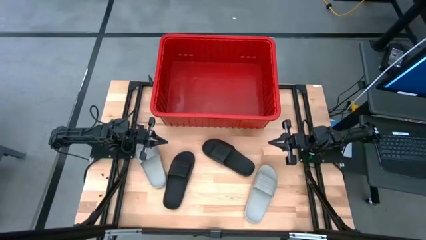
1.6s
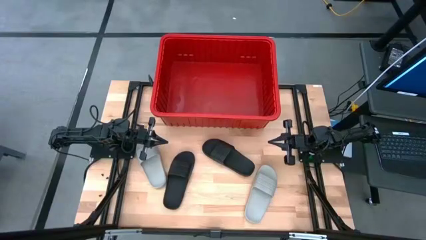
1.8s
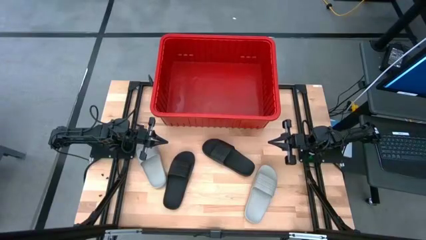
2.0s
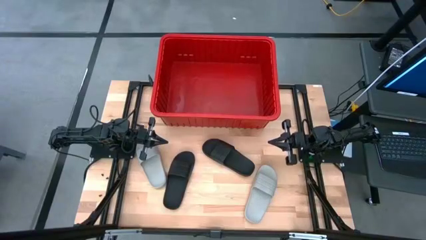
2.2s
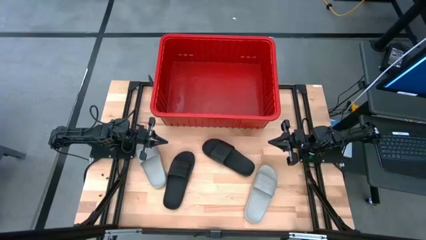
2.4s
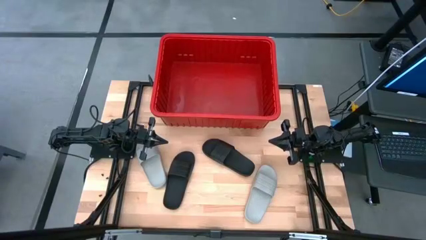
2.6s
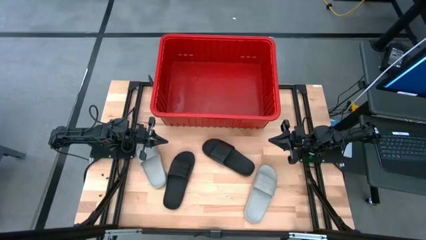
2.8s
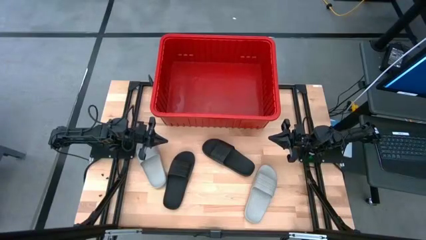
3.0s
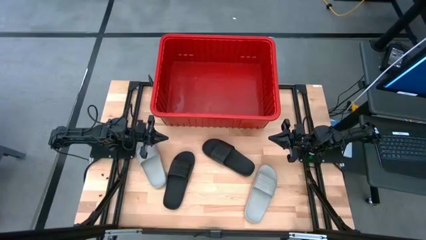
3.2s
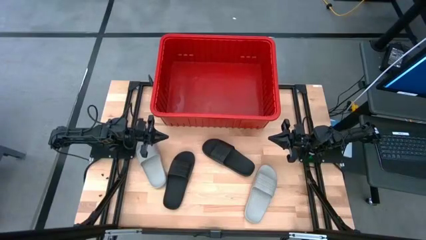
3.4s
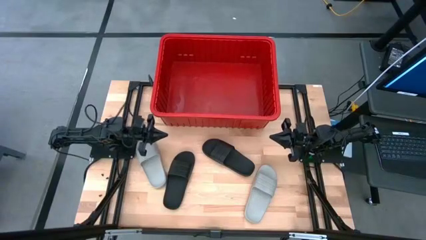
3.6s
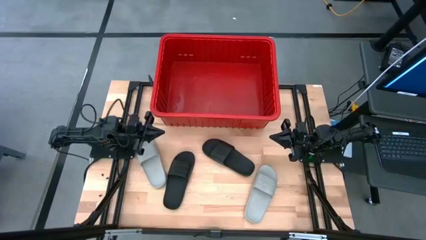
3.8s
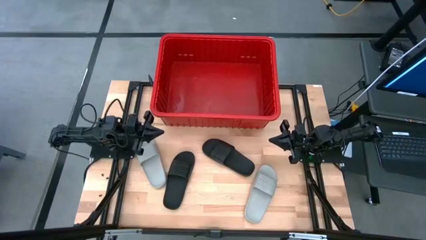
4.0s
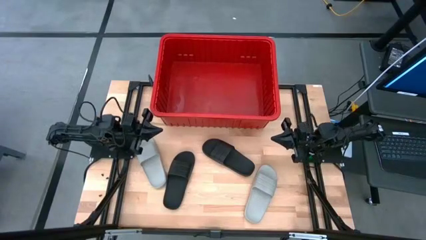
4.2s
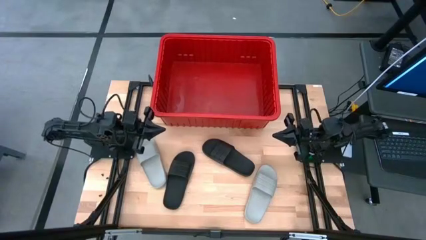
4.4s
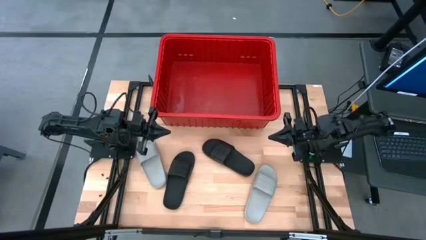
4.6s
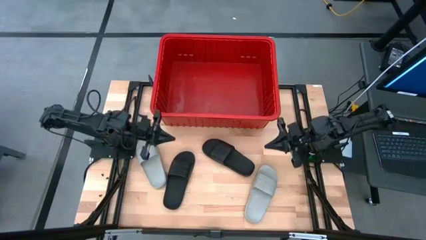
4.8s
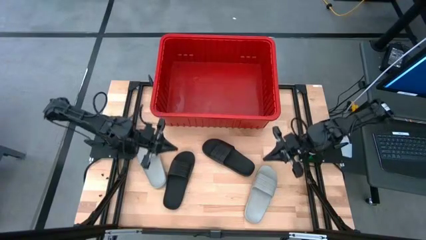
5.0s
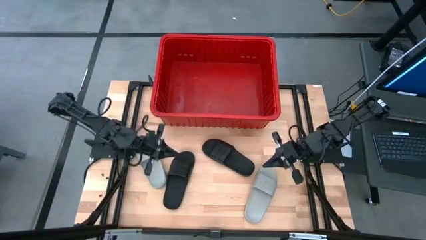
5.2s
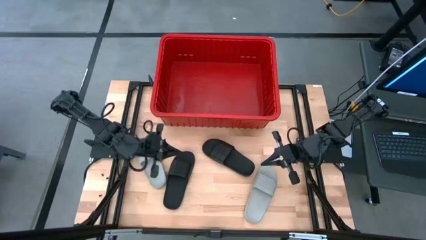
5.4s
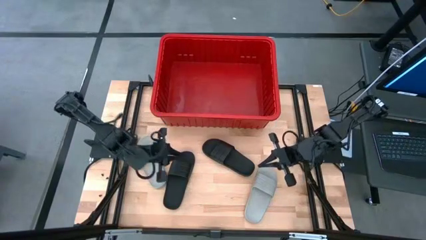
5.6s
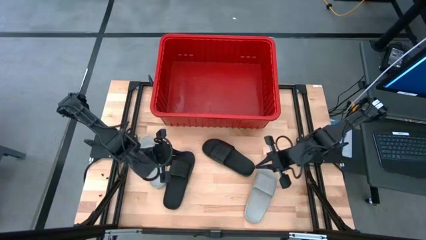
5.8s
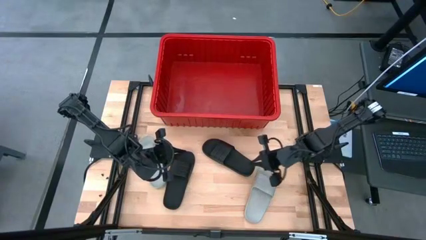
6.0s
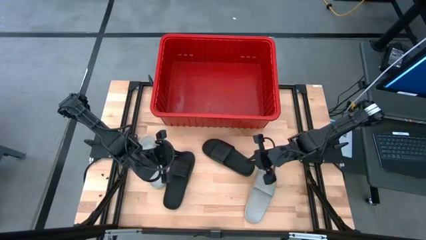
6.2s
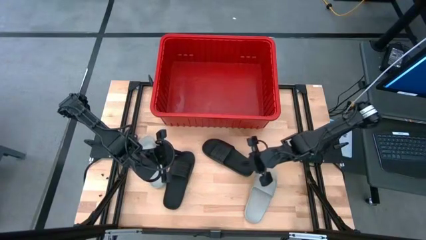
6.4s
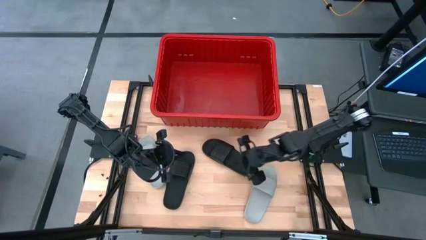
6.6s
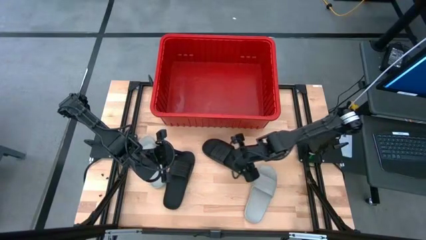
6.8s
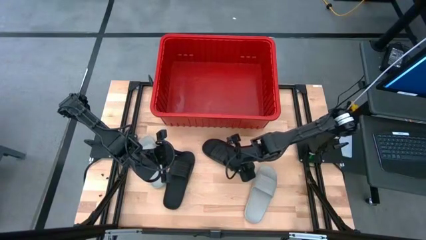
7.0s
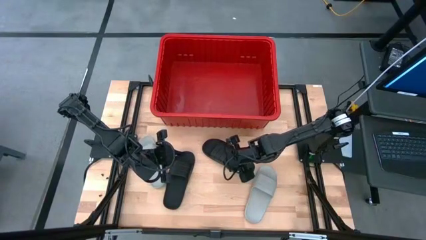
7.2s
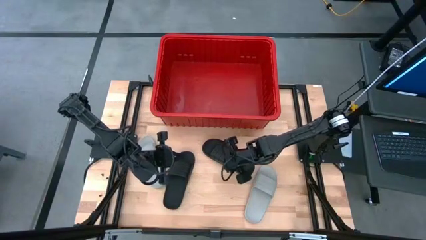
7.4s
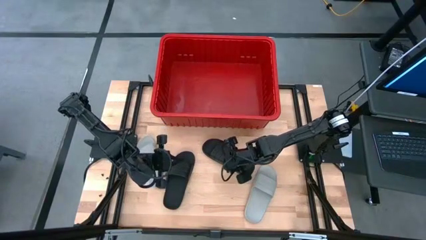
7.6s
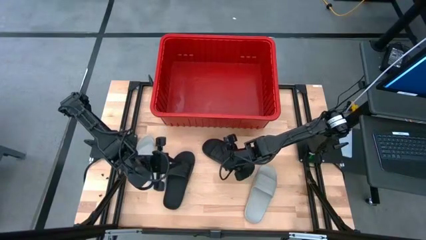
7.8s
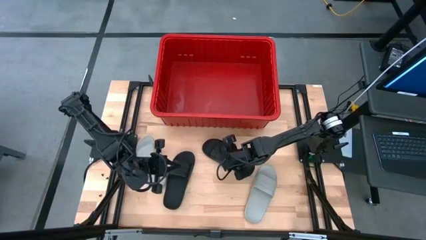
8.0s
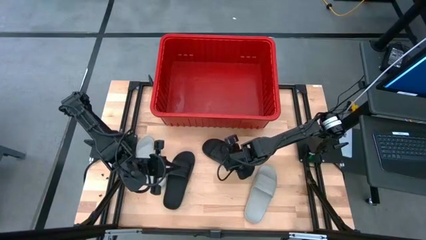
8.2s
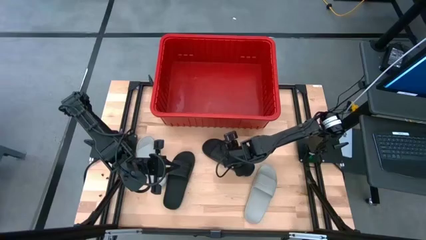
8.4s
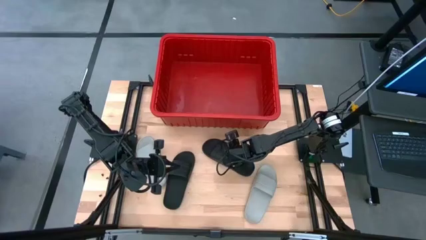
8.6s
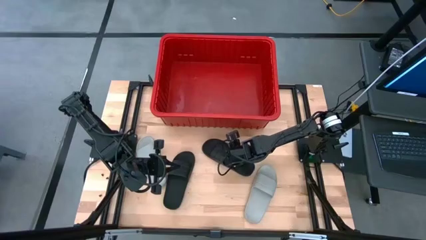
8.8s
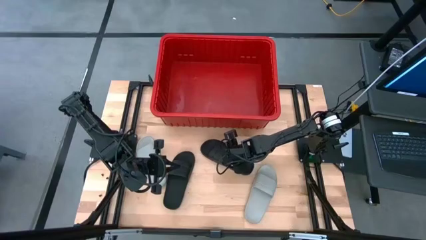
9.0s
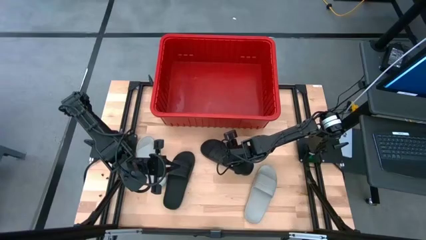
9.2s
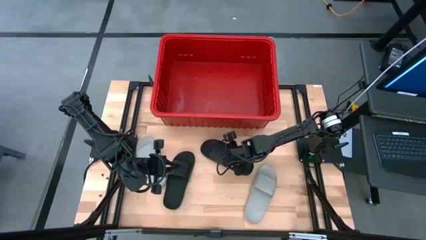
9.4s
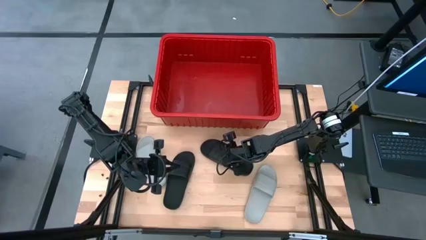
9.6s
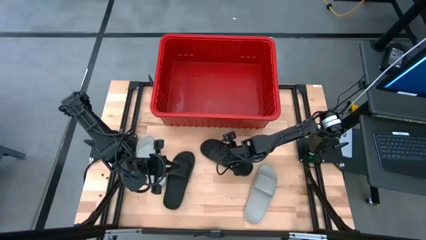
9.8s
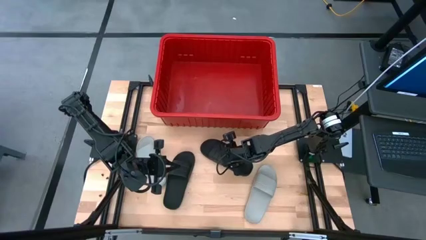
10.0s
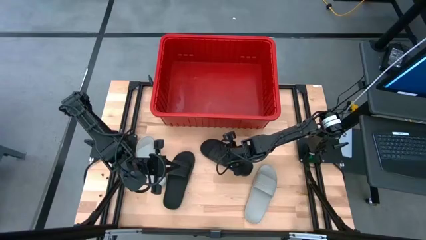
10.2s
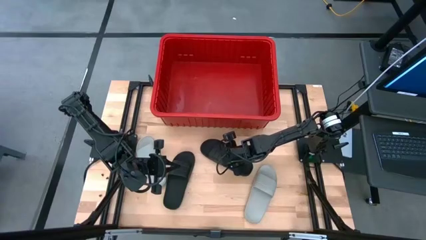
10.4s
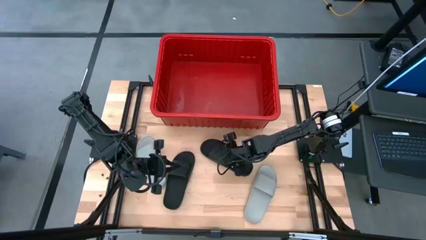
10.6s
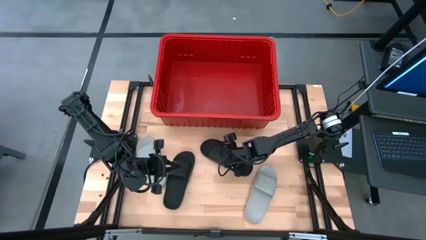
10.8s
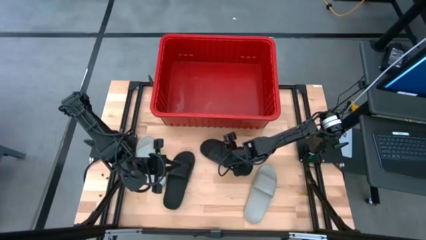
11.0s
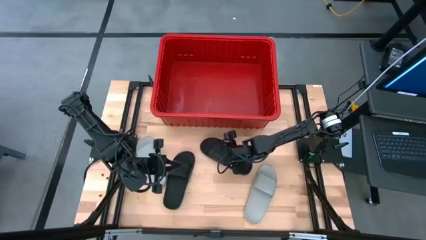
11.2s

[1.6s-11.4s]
Task: Pick and place slides into bin
Put the right black slide into the red bin

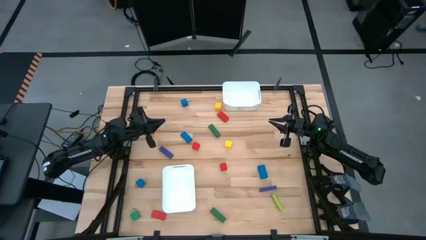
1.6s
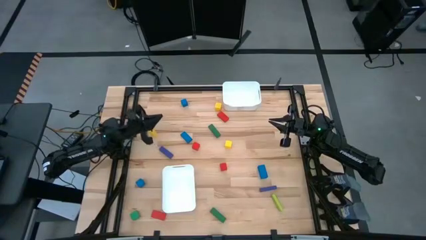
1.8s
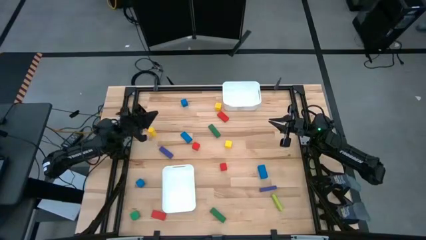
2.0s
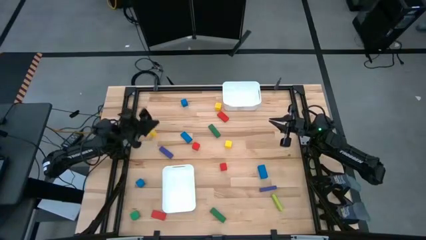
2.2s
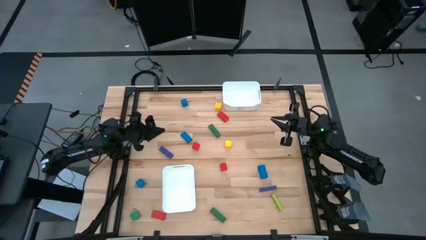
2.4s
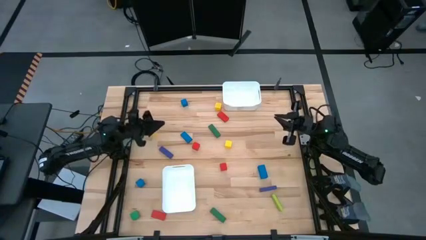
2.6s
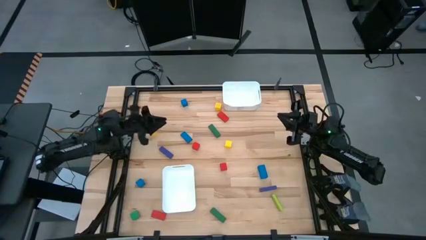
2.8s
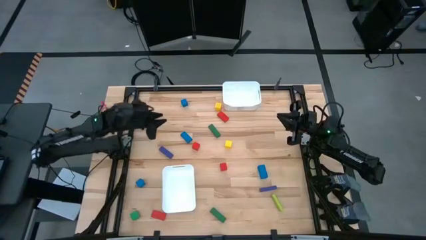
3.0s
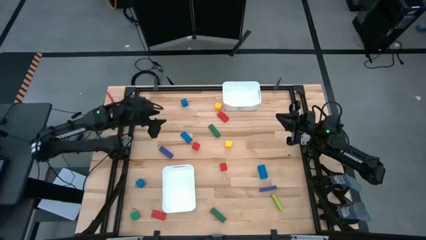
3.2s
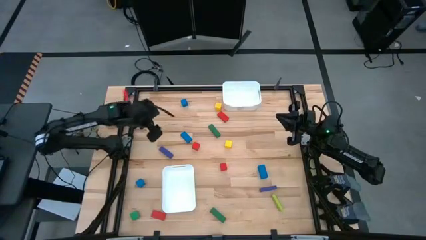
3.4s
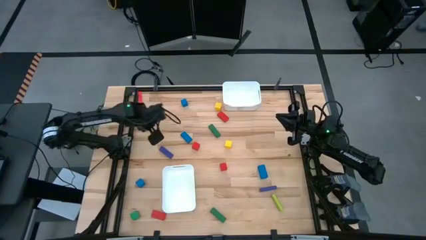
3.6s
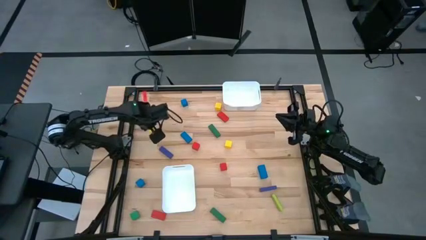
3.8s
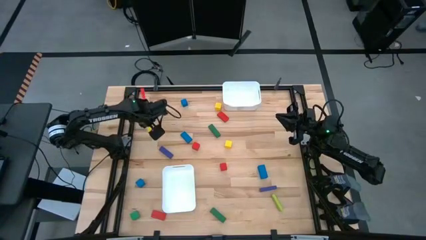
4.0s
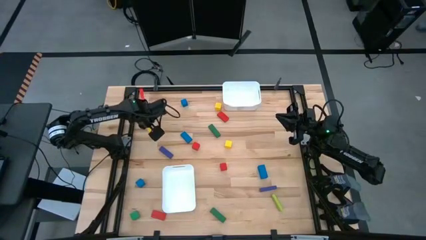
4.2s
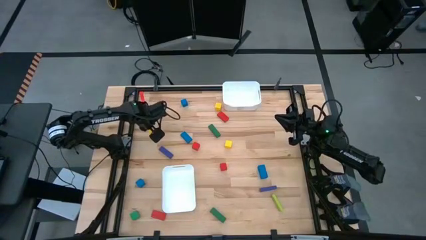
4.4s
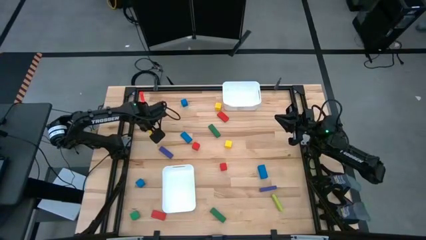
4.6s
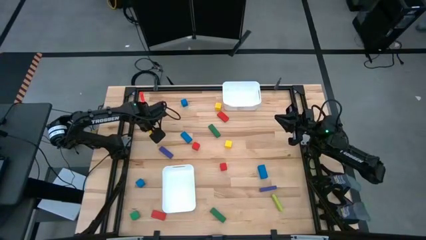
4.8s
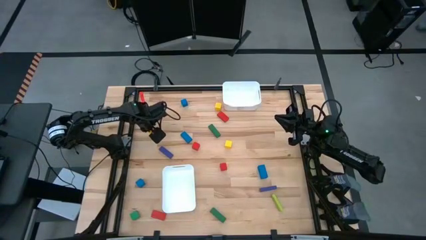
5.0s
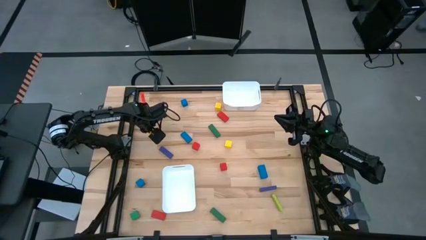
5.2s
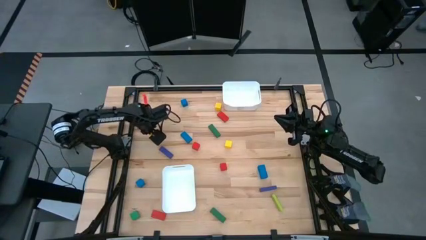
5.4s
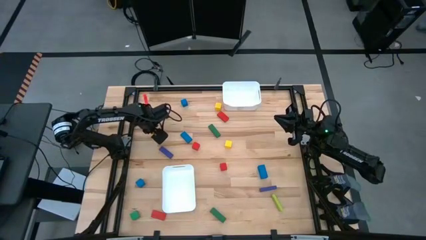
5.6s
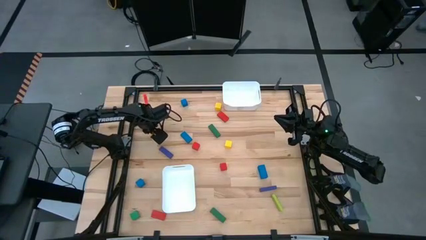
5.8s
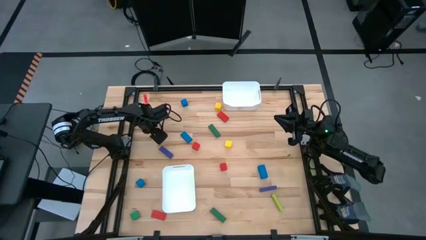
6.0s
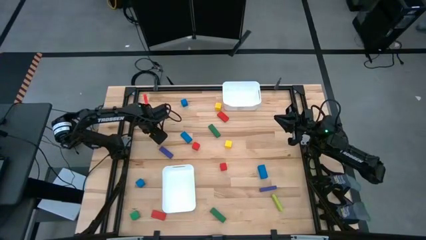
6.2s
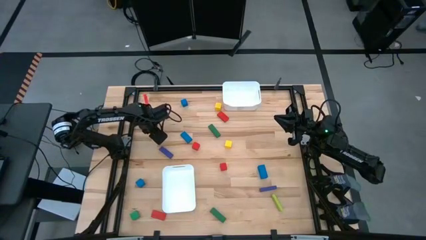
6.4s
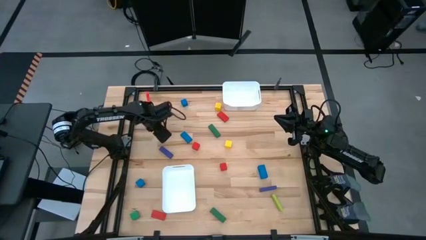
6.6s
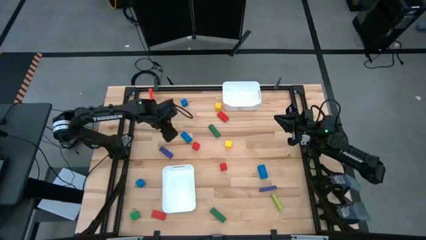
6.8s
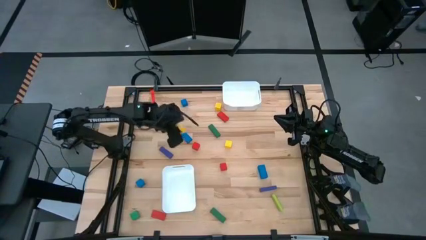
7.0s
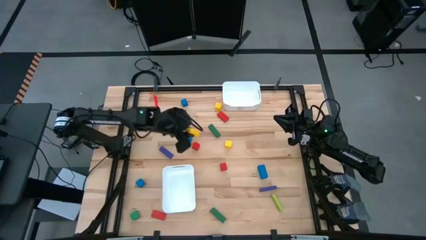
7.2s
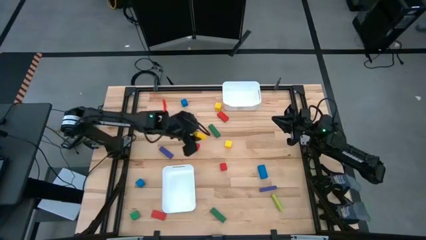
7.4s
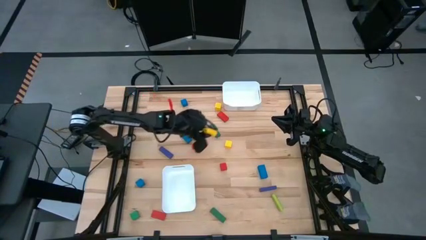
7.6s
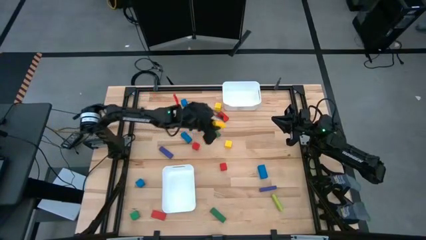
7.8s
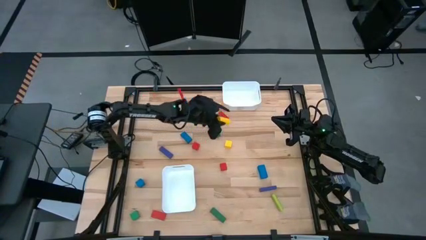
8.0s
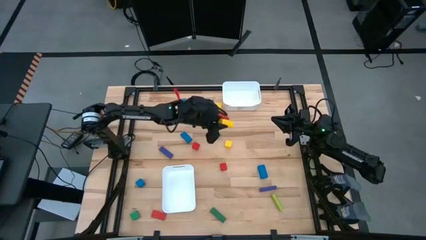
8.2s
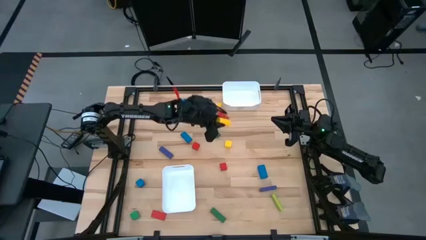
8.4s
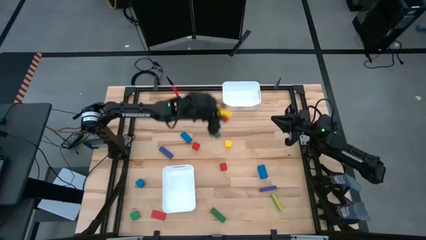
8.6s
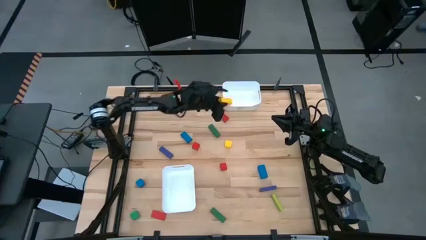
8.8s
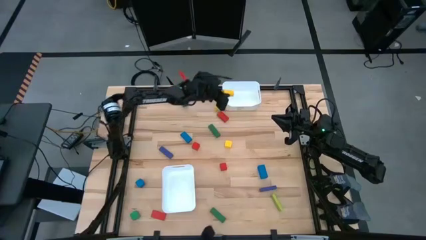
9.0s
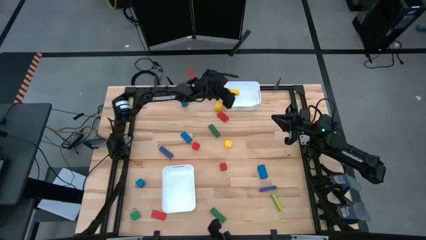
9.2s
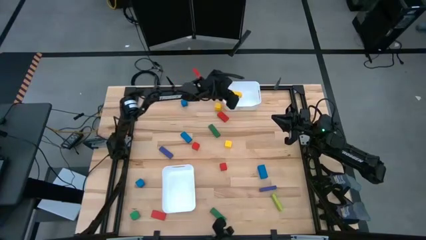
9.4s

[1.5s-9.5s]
Task: Sort blocks by size
Put the yellow large block into the top white bin
